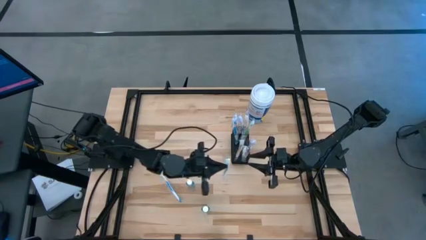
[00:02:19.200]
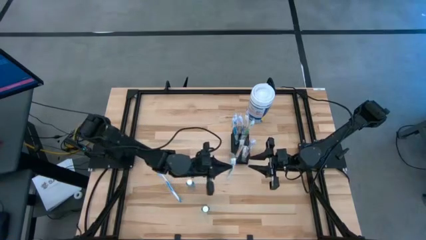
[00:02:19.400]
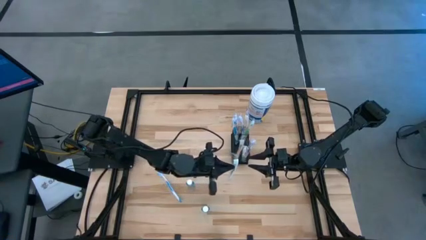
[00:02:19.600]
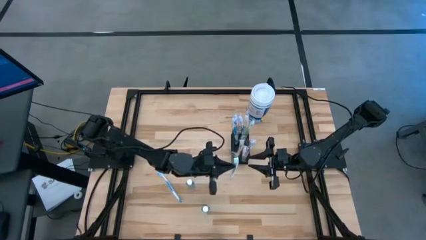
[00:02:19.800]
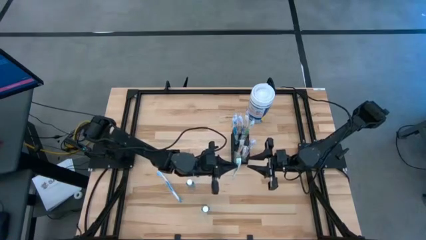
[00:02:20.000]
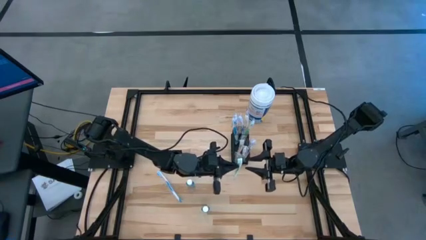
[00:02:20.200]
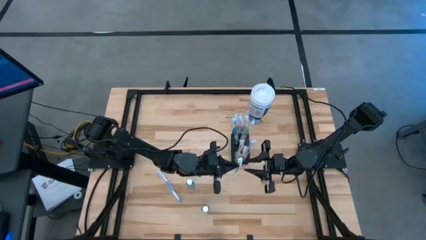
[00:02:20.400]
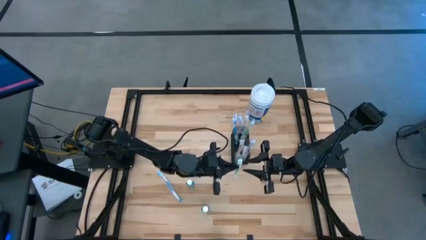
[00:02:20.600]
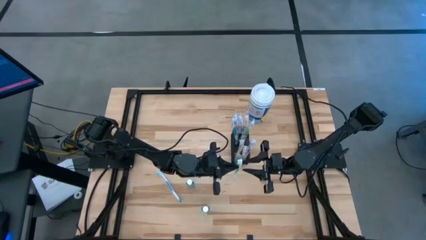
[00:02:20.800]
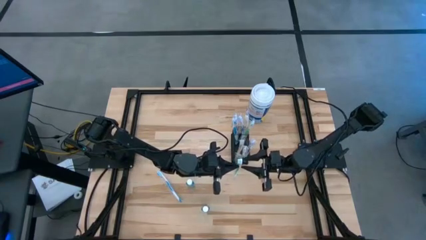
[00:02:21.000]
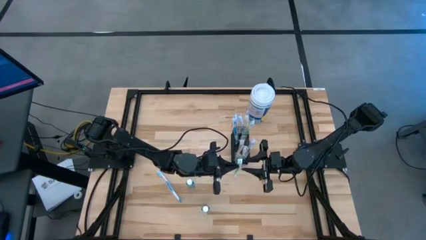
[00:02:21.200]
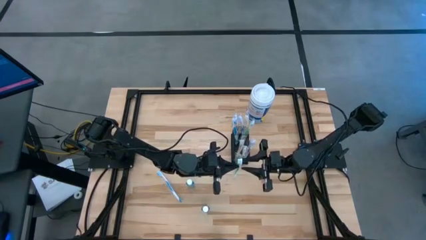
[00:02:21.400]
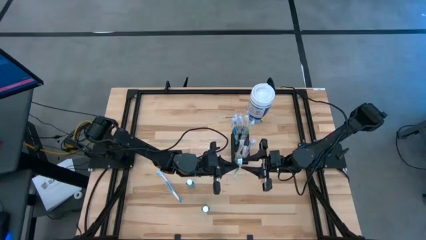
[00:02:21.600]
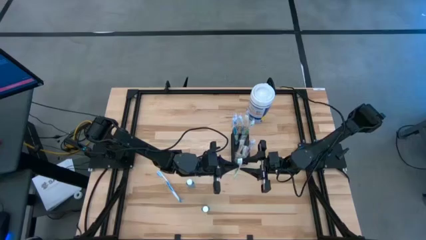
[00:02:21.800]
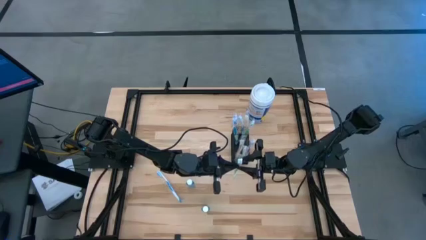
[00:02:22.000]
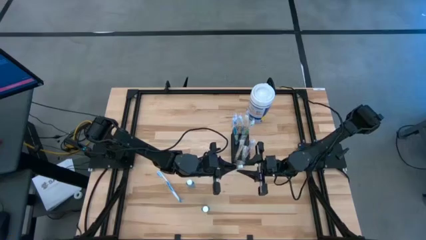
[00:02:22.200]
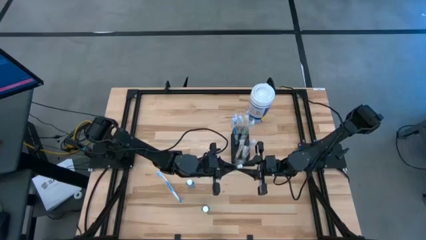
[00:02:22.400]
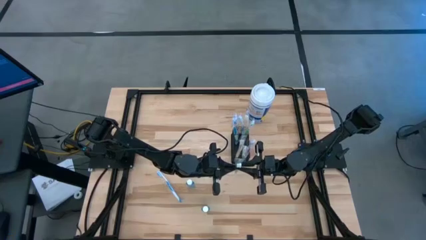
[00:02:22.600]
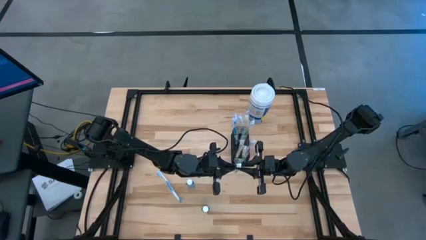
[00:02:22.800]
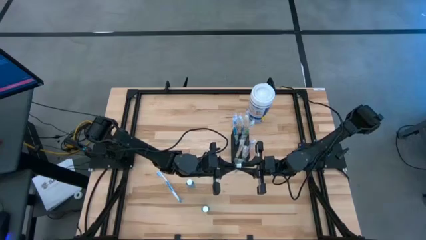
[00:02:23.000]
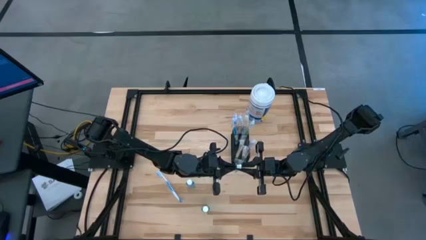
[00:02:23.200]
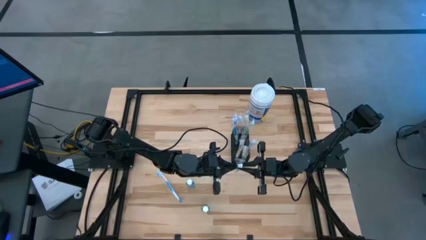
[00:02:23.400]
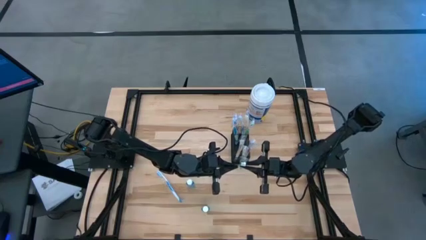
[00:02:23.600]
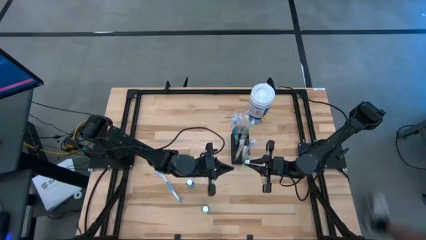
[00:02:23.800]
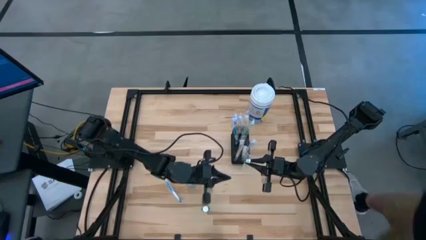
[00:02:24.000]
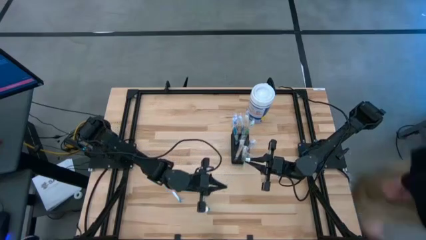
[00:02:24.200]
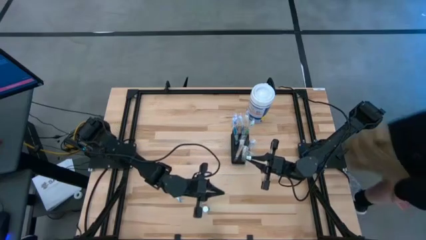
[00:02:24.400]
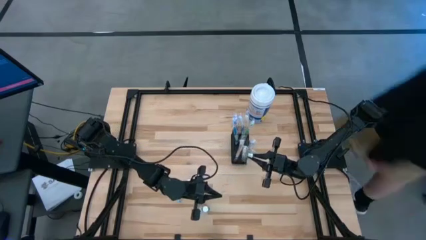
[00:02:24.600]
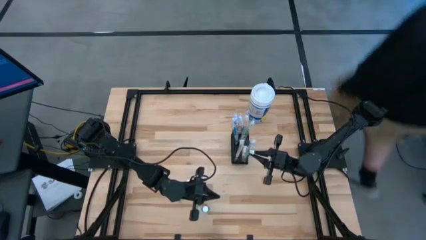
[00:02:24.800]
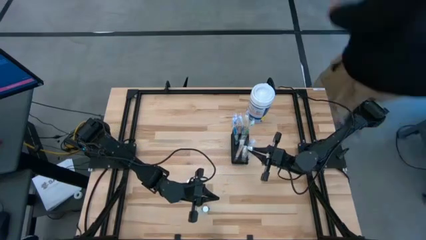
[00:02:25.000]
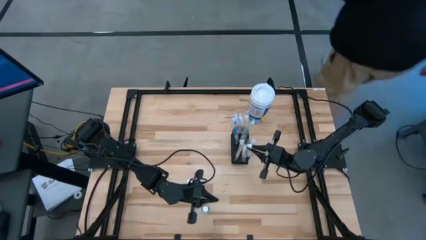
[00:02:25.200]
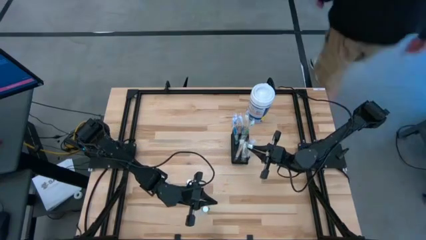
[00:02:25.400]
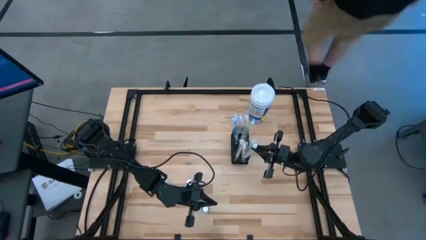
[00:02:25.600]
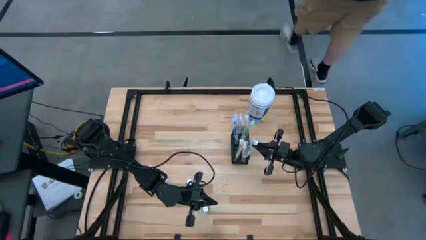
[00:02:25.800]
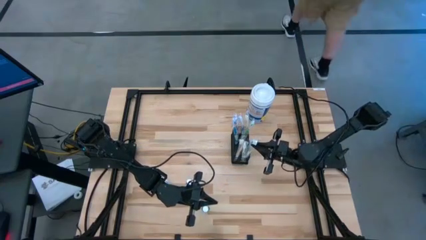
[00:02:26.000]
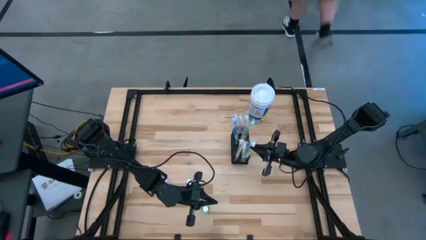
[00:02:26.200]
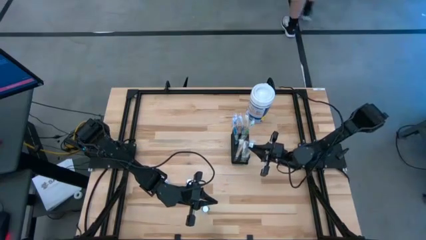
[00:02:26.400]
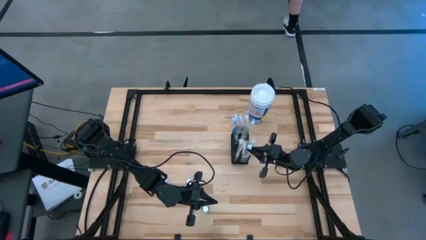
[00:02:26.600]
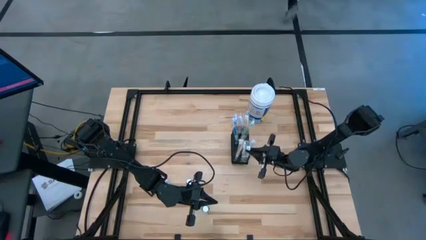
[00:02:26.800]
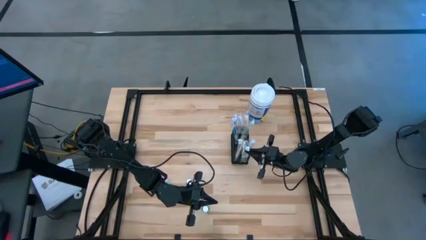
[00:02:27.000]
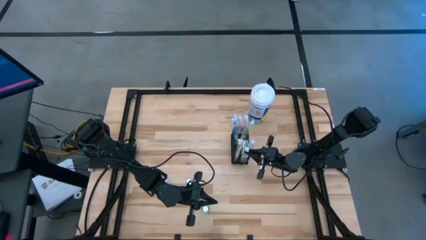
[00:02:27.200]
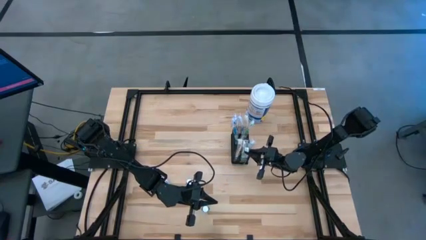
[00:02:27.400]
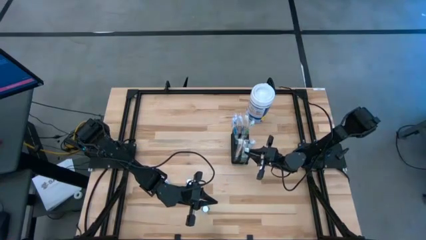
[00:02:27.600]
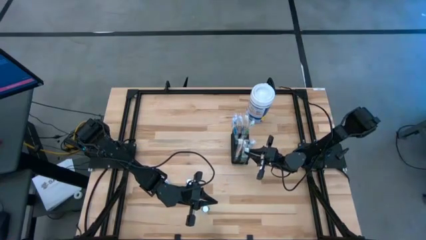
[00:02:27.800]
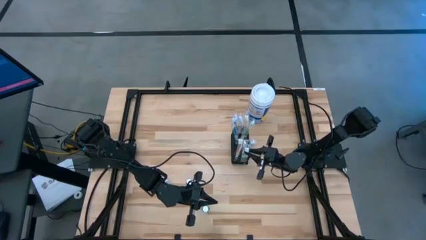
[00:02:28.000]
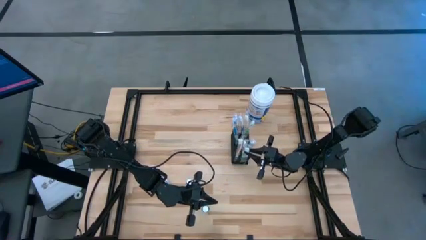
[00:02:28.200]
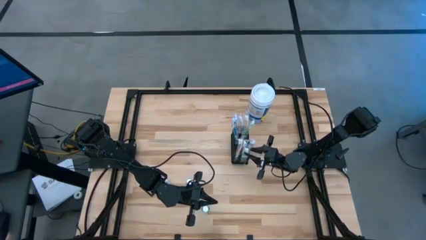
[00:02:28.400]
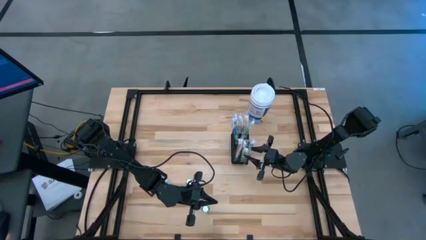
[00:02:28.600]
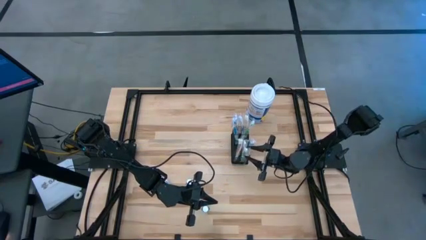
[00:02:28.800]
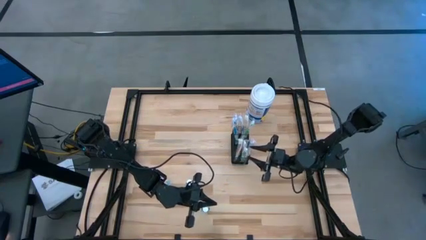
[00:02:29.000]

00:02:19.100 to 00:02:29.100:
Task: Pick & Place toothbrushing station
Put the green toothbrush into the wire mesh organizer

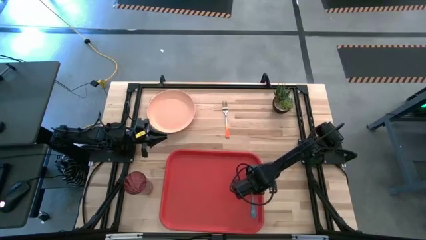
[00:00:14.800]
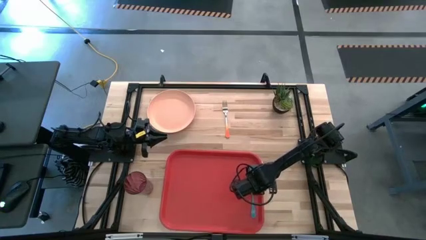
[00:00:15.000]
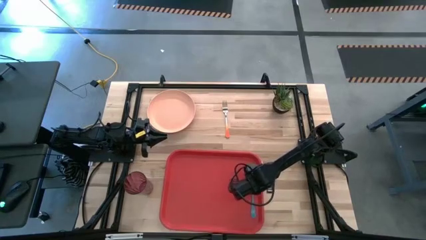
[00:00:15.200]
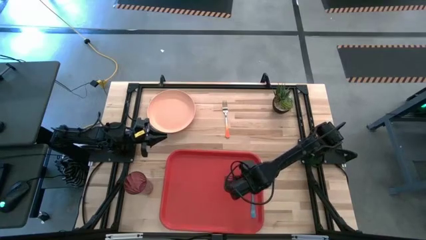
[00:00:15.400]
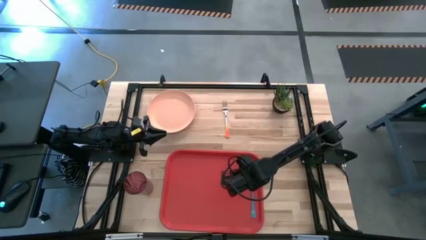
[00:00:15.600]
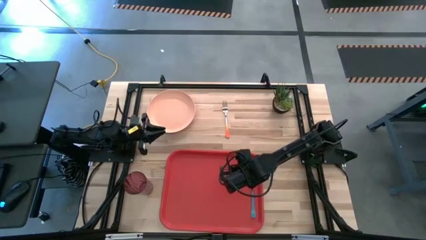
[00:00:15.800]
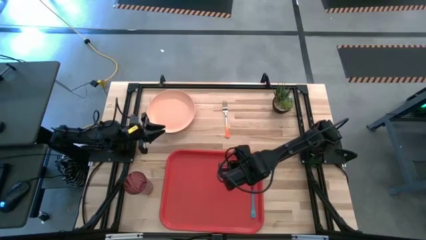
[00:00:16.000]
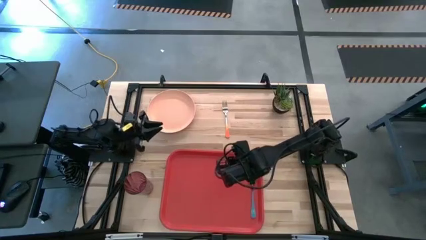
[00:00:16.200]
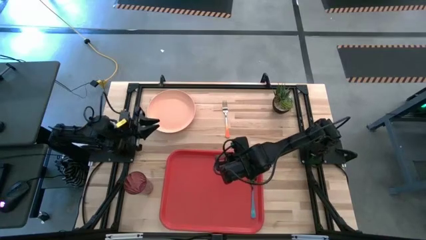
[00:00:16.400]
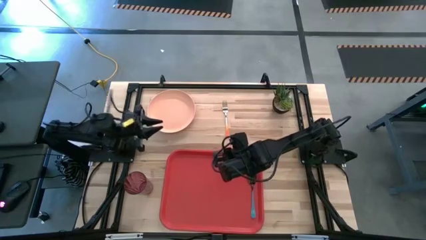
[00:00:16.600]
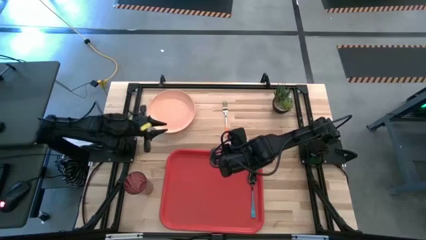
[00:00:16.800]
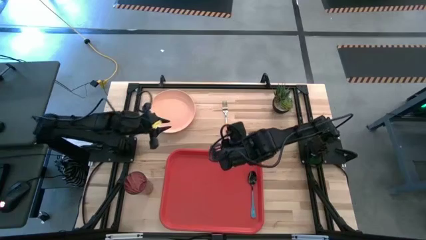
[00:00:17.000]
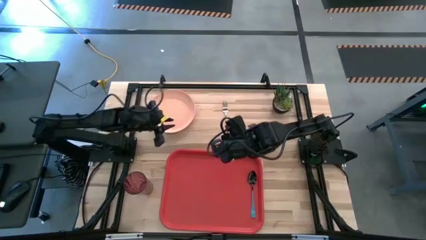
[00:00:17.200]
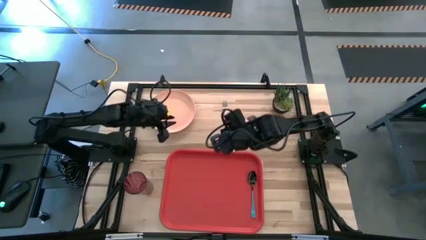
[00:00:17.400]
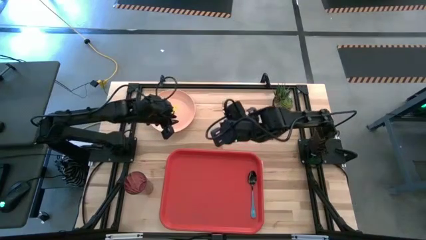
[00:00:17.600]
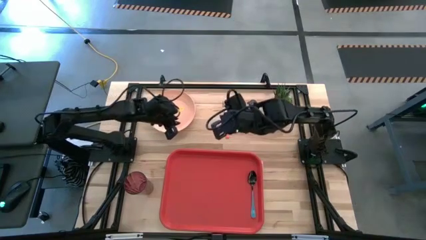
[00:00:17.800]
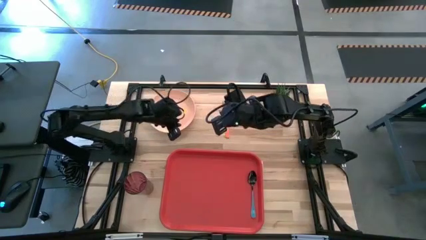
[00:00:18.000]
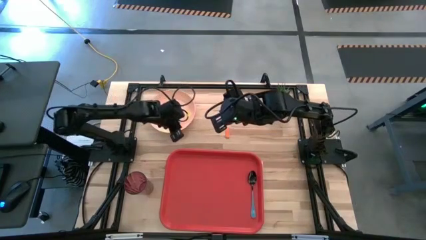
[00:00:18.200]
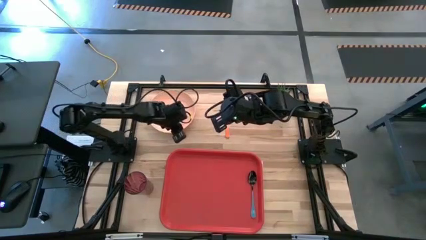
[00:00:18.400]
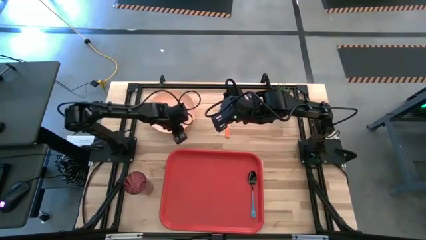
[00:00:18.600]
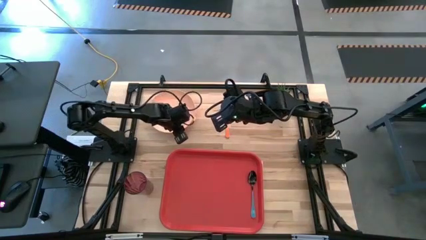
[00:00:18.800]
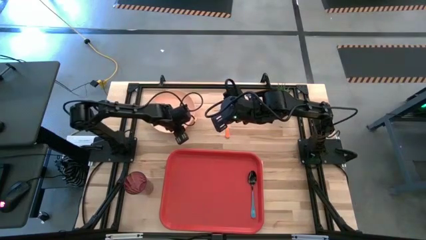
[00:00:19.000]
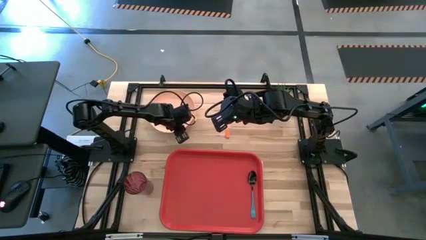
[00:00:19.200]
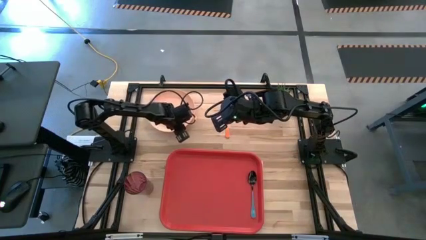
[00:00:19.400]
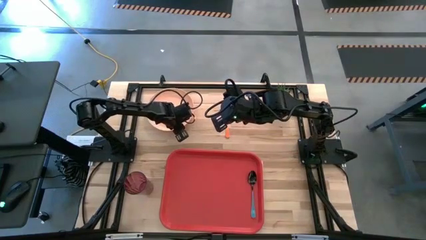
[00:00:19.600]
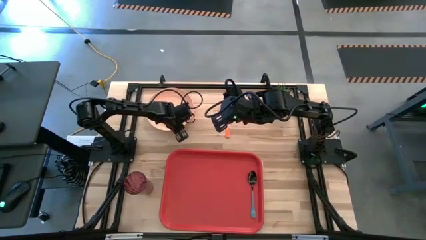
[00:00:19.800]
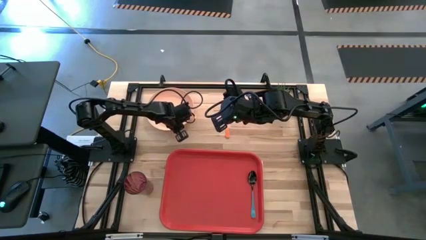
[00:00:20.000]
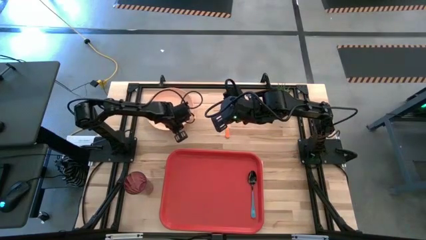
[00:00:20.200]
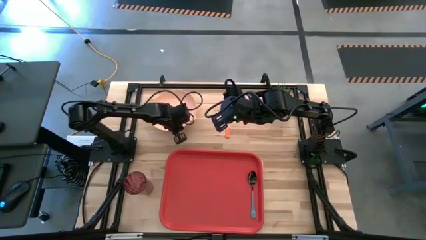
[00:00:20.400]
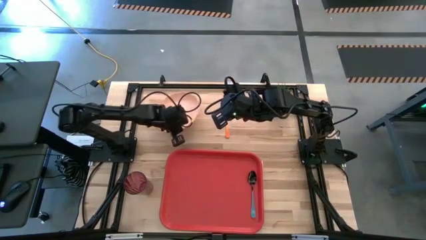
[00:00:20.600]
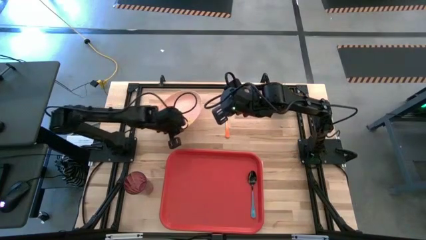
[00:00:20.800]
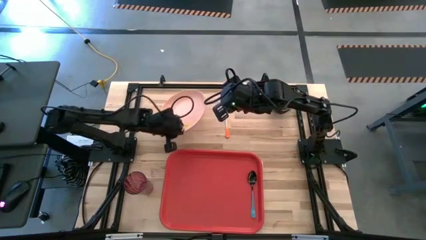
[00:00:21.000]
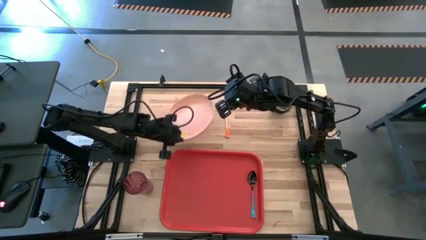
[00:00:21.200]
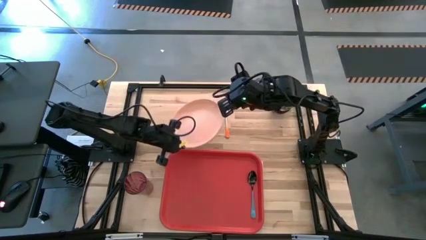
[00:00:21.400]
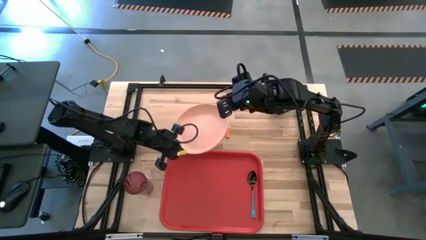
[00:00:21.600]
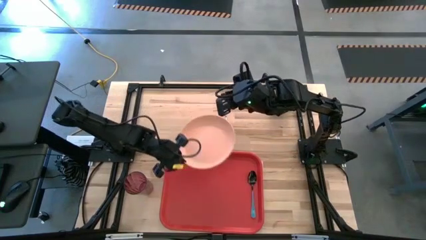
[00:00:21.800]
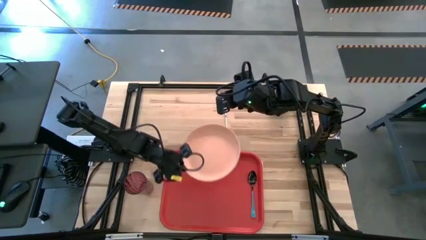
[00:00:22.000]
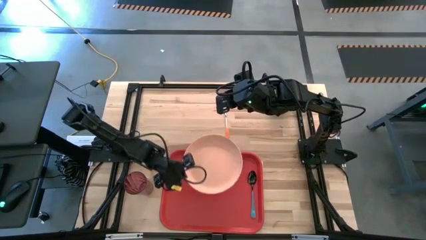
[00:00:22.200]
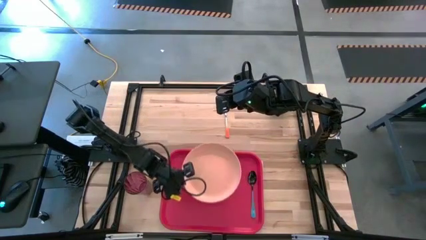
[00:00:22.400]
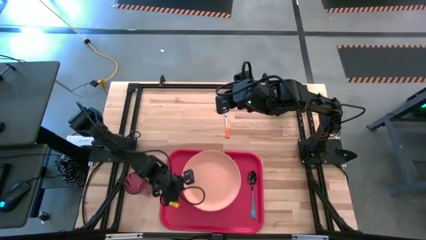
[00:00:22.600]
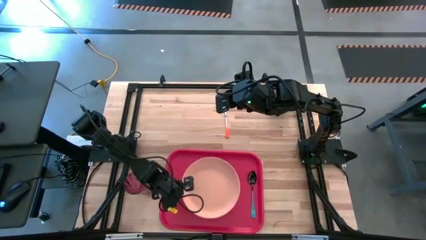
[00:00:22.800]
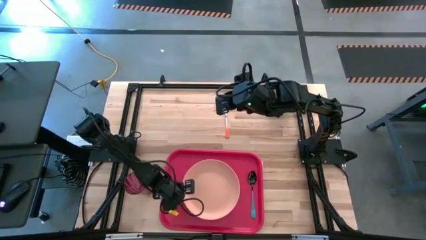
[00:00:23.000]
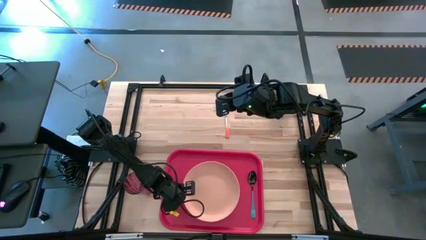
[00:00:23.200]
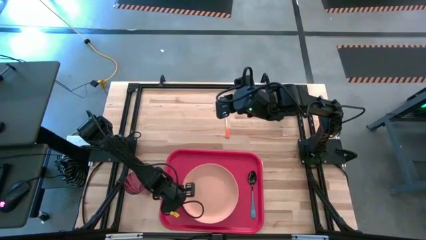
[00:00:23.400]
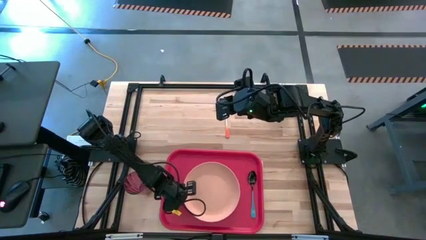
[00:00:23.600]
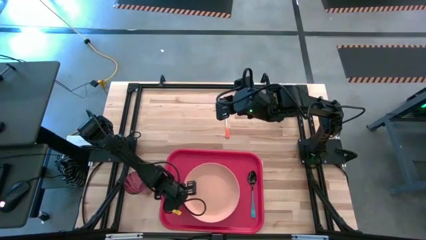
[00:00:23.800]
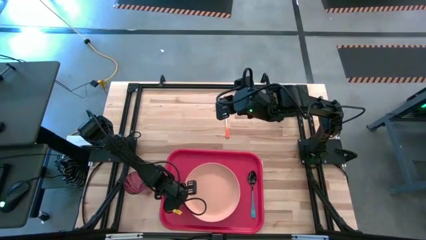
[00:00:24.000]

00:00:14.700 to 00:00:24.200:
Task: Pick and place plate/cup/fork/spoon on tray
Put the light orange plate on the red serving tray
